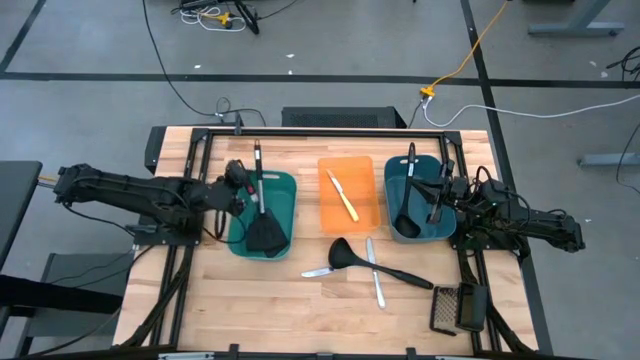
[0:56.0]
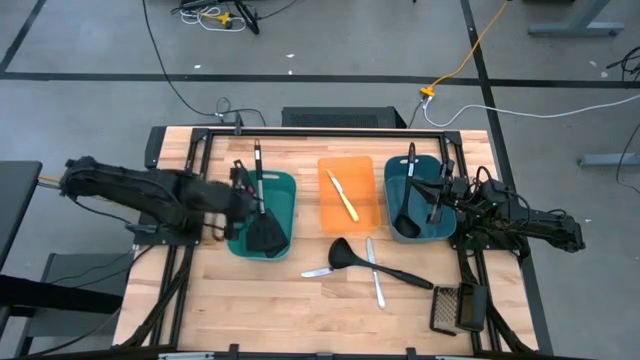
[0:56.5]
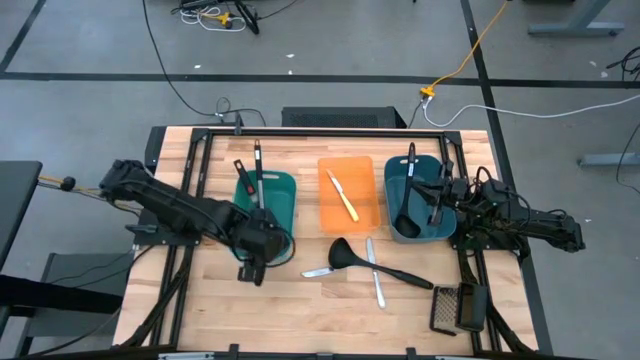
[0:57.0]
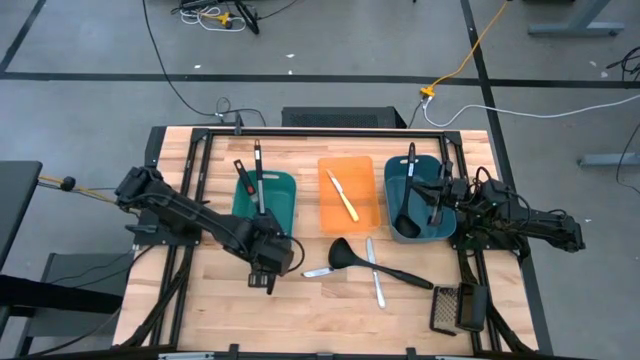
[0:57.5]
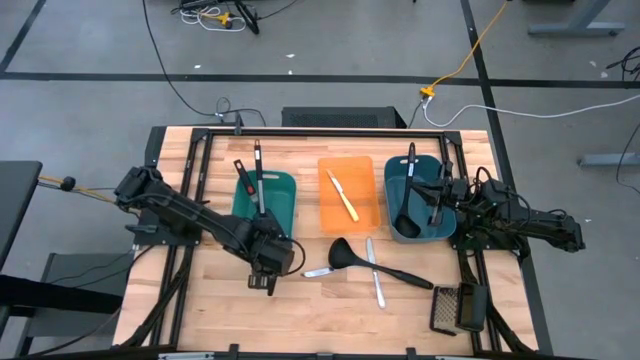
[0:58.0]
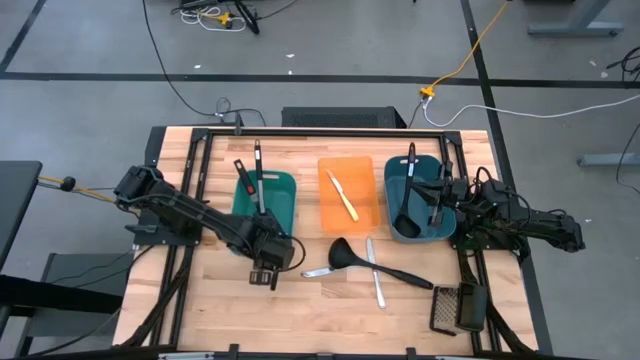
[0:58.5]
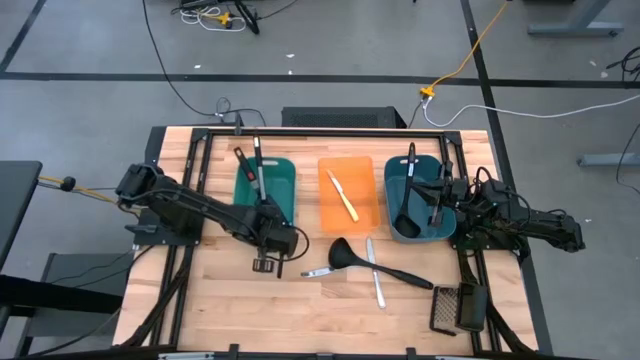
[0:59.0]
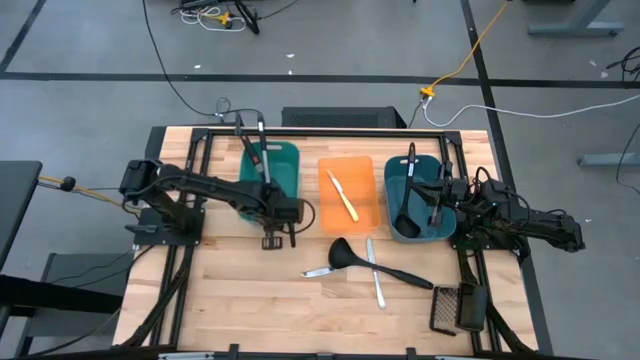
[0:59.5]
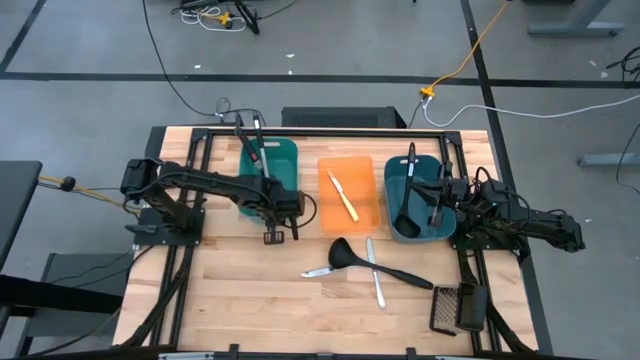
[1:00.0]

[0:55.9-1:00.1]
Task: Pick & Place Kitchen Items
Adjust the green bin

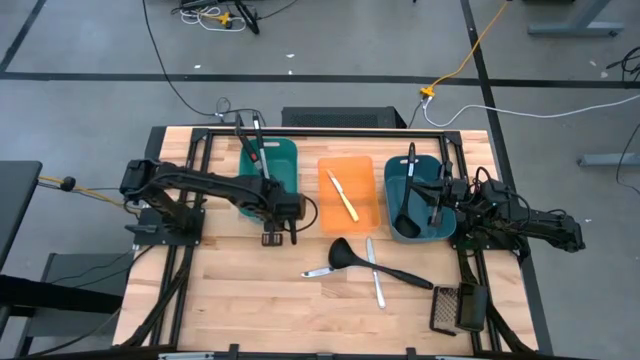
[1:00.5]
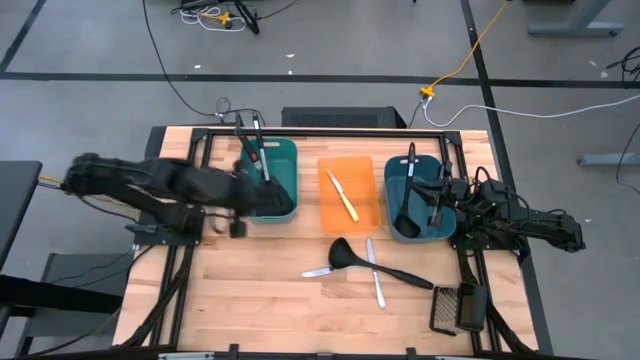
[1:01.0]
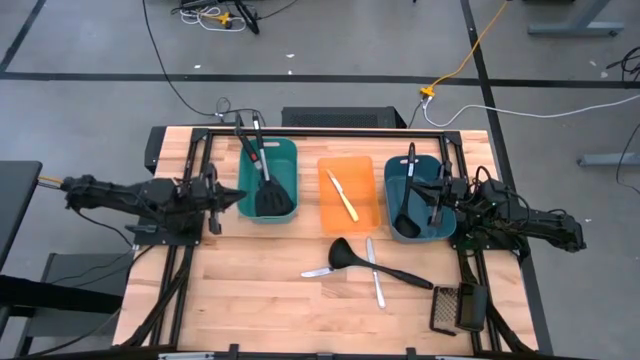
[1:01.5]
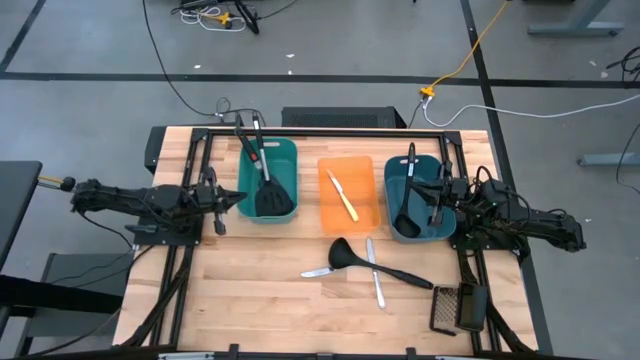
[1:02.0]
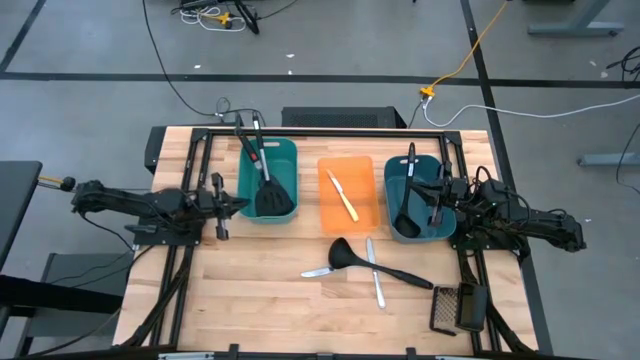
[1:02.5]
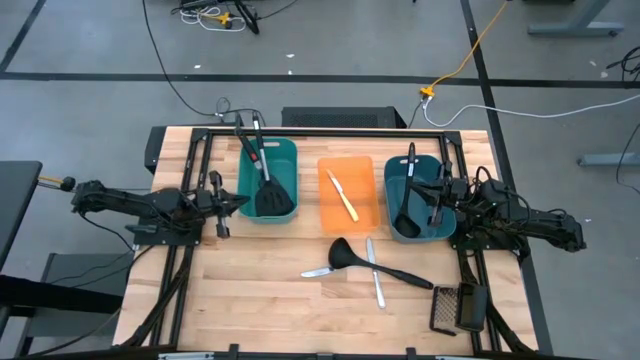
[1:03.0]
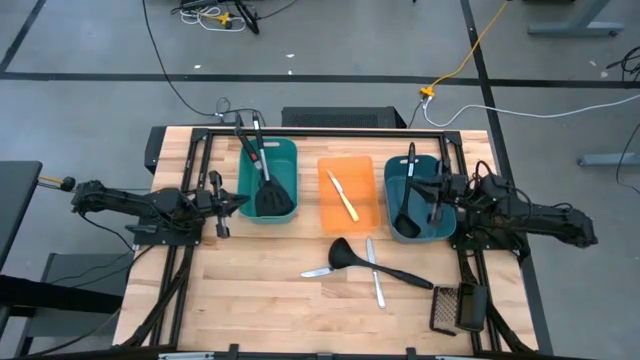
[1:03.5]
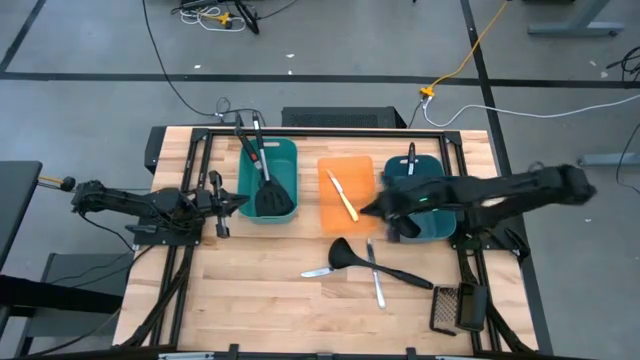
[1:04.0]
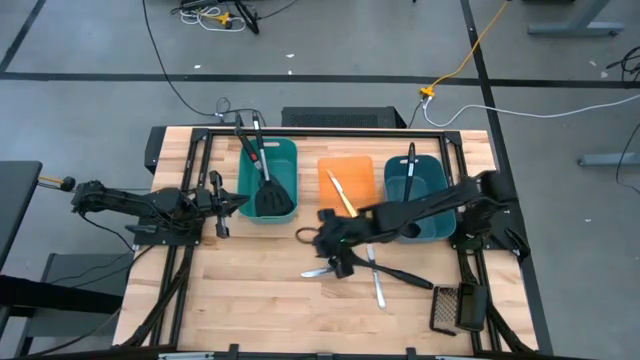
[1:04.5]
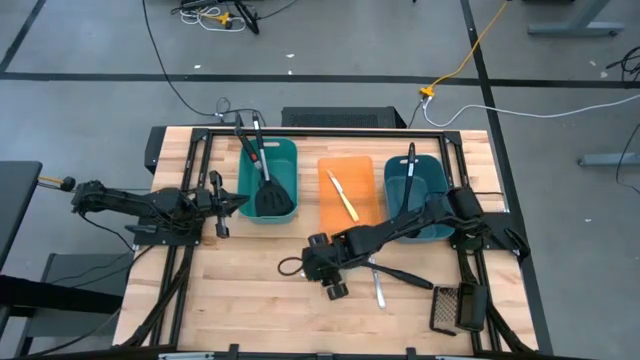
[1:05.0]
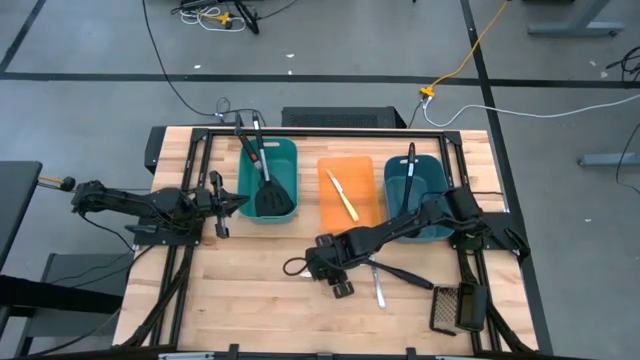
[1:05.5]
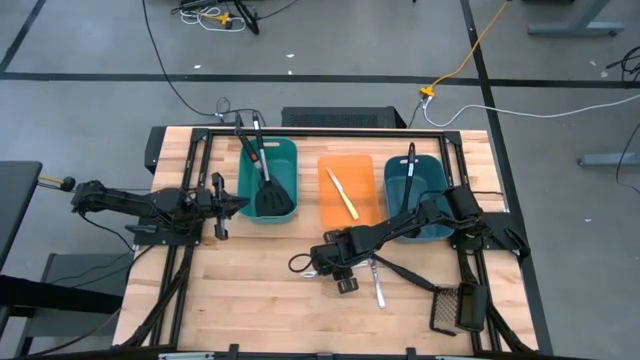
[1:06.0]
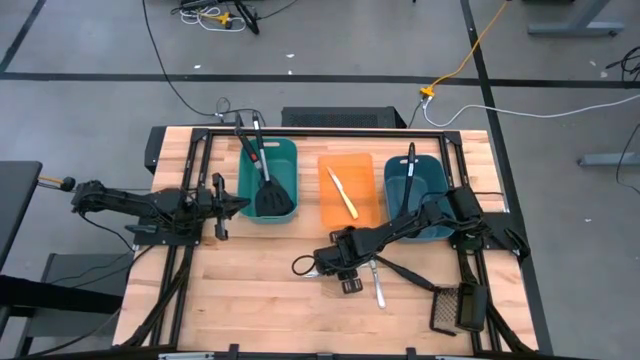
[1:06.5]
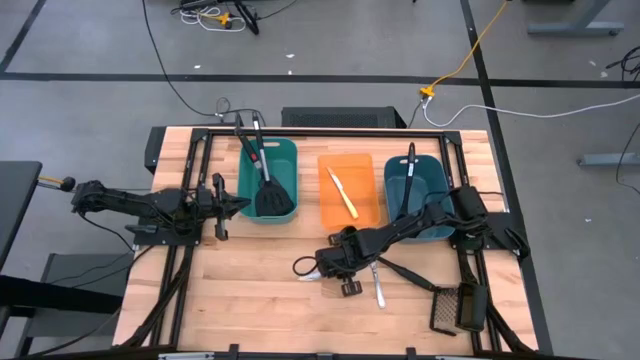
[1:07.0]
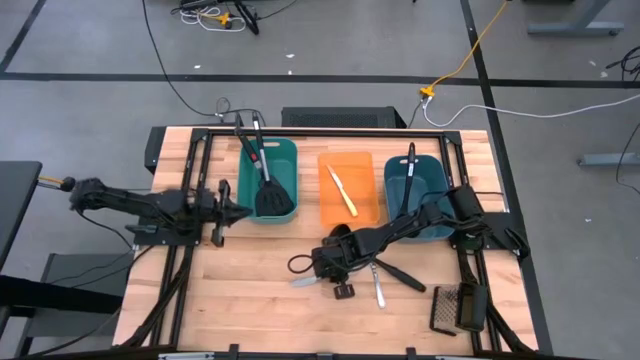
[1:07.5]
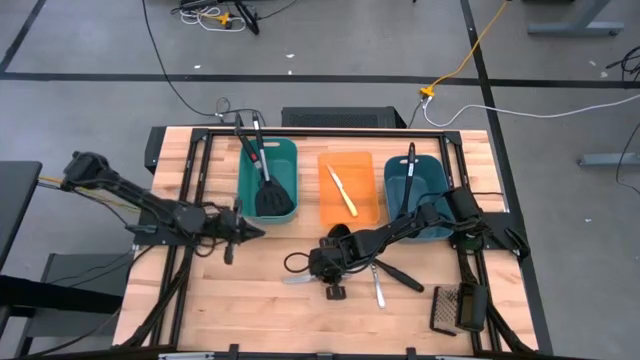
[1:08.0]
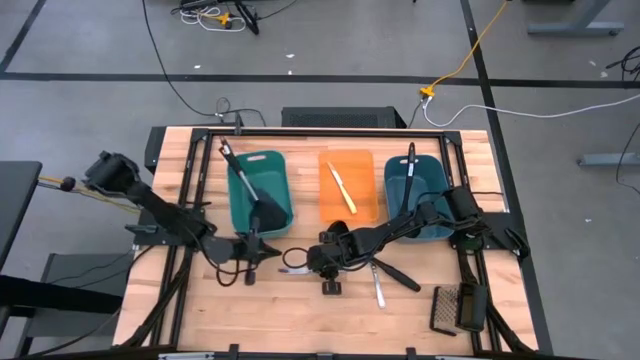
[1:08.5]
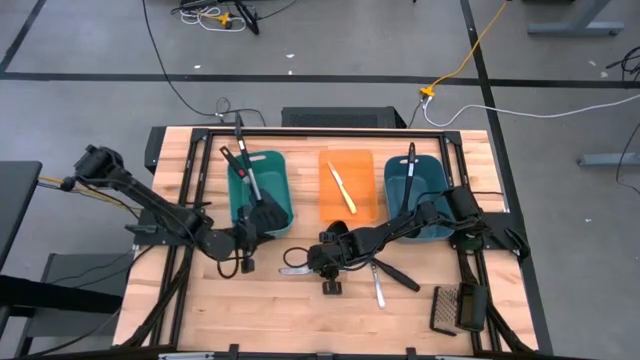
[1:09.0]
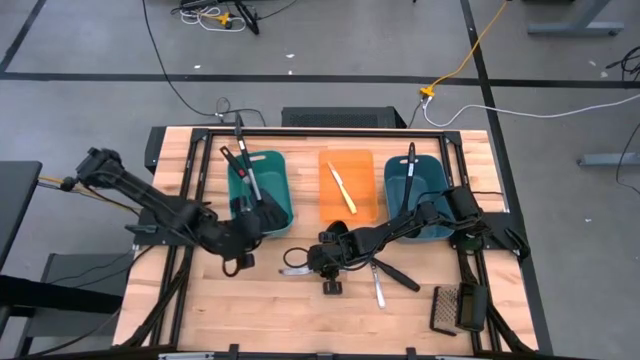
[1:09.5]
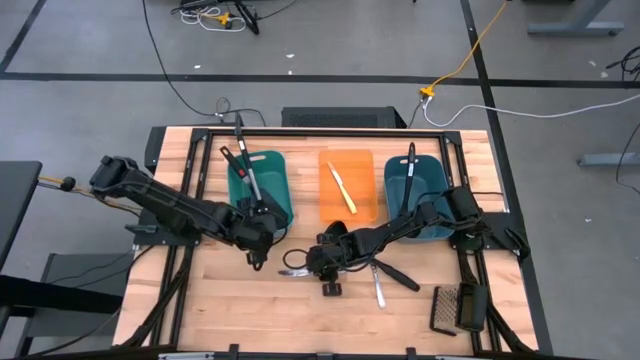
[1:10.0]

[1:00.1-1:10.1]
Put the left silver table knife into the orange bin

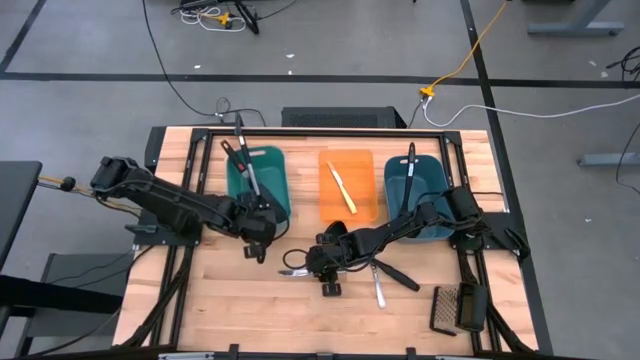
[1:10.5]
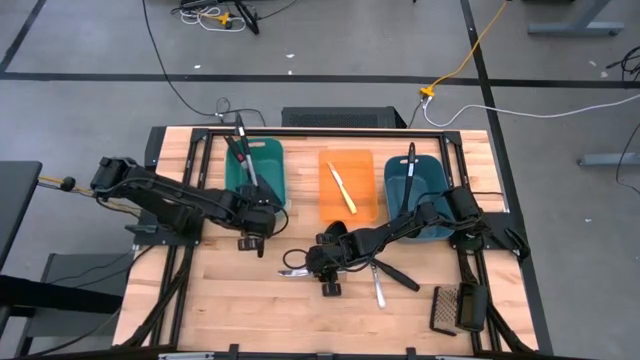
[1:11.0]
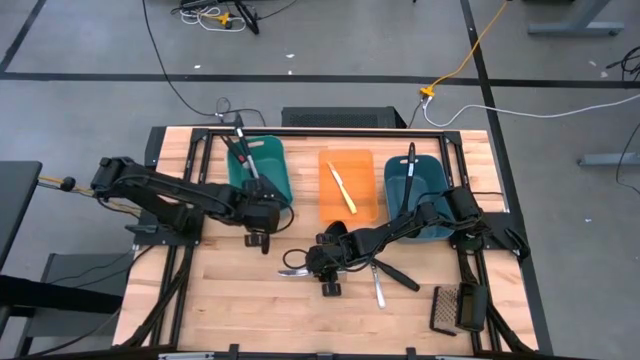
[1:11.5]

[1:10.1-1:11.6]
Adjust the green bin

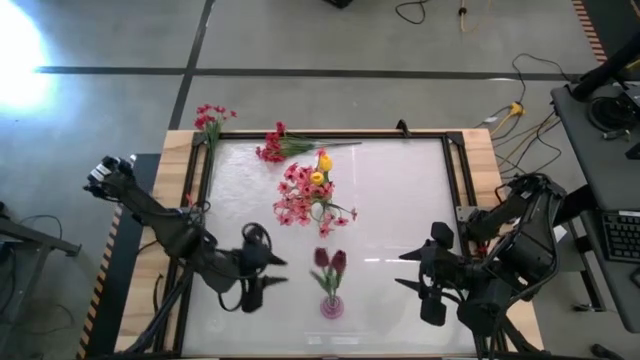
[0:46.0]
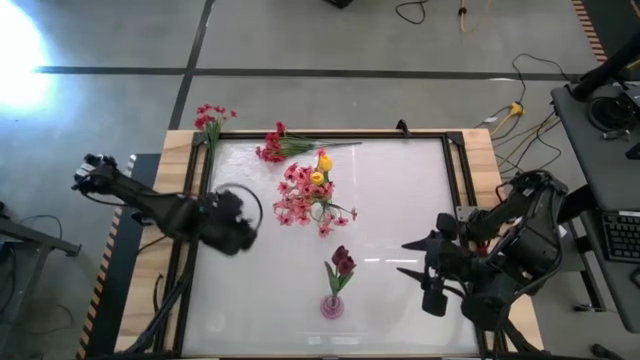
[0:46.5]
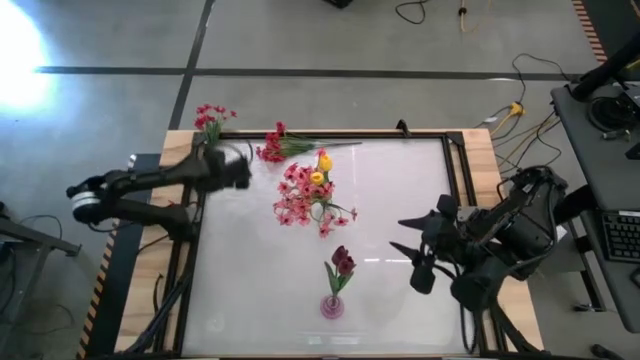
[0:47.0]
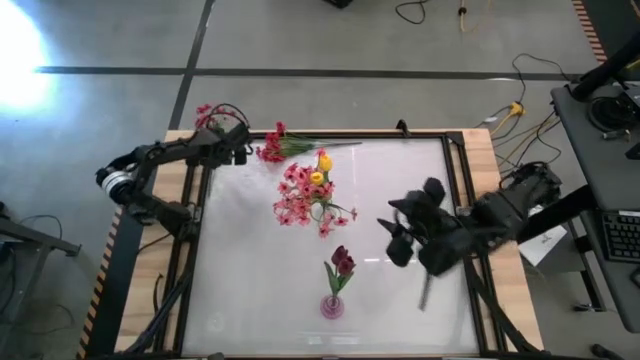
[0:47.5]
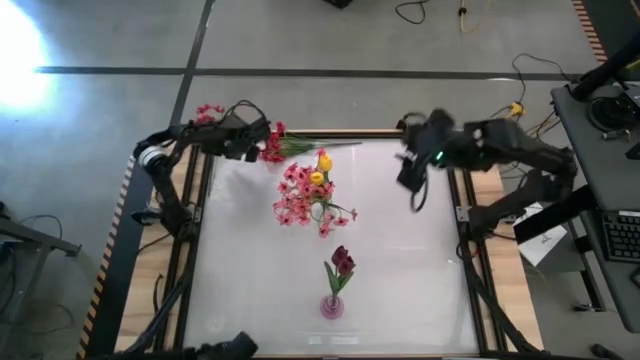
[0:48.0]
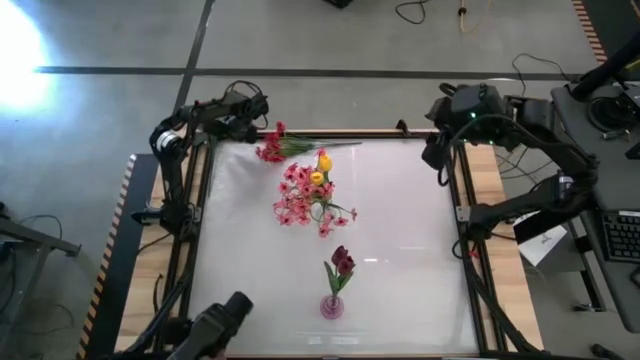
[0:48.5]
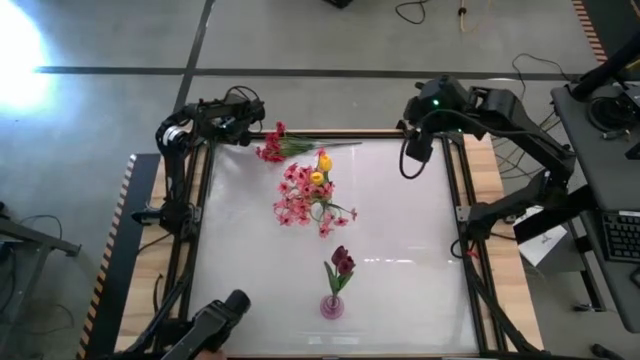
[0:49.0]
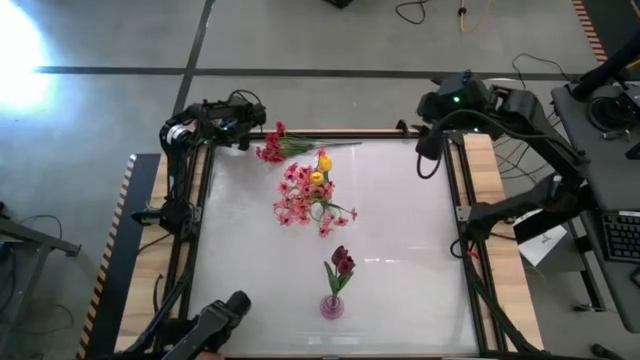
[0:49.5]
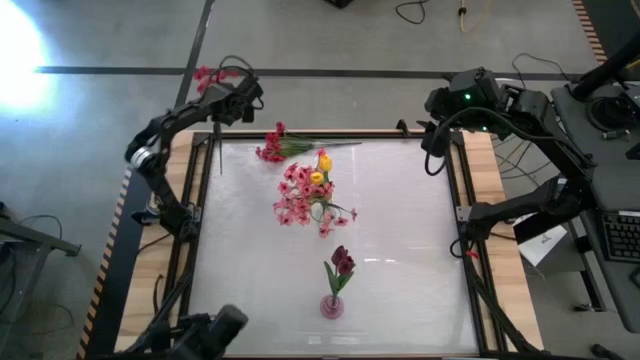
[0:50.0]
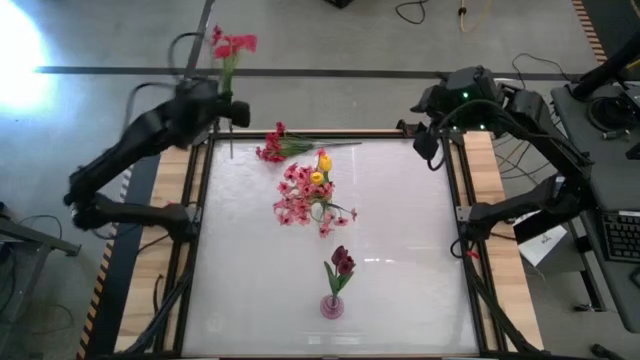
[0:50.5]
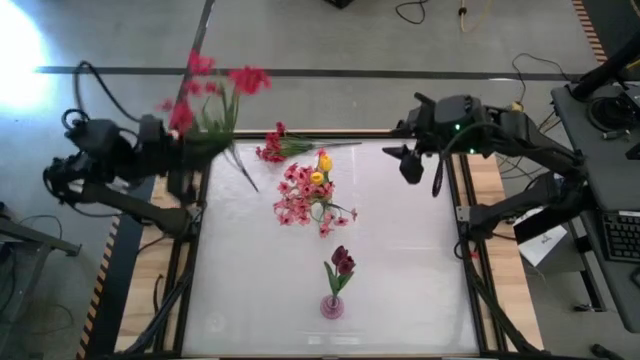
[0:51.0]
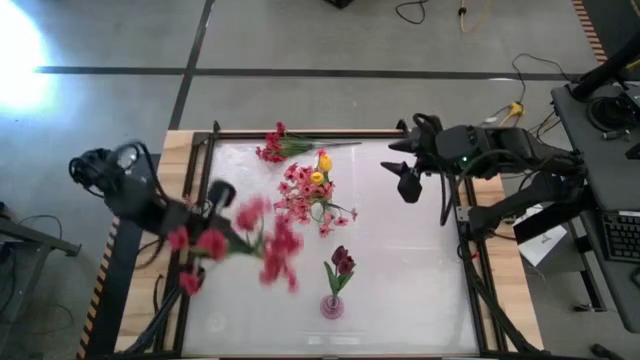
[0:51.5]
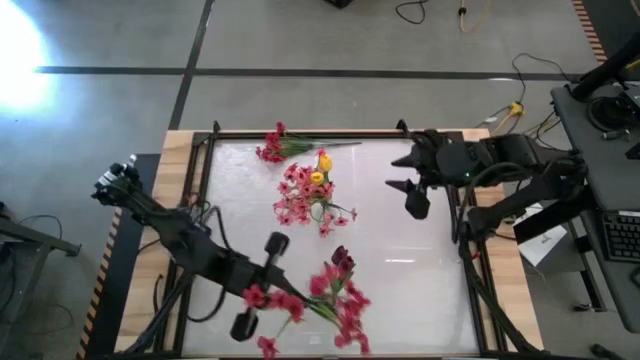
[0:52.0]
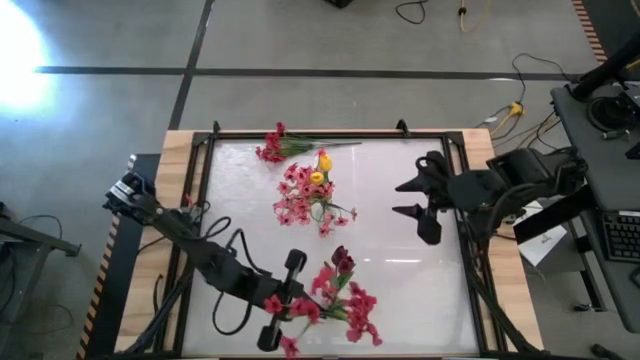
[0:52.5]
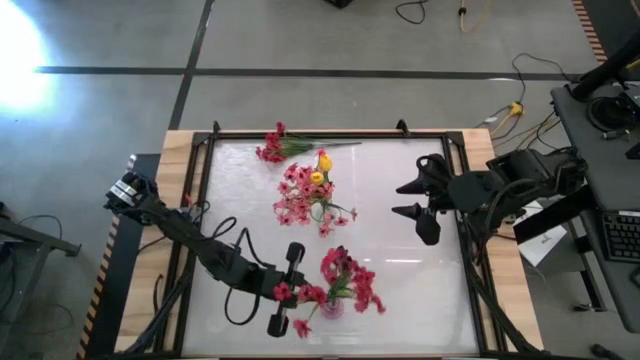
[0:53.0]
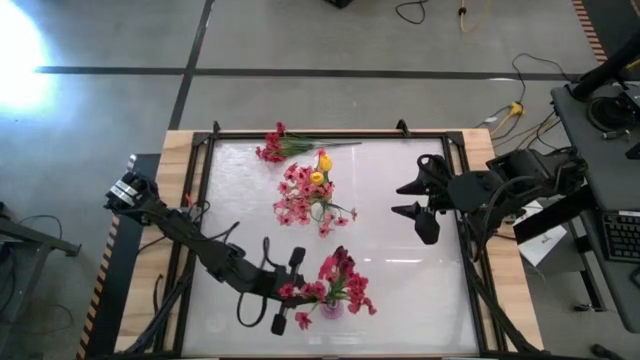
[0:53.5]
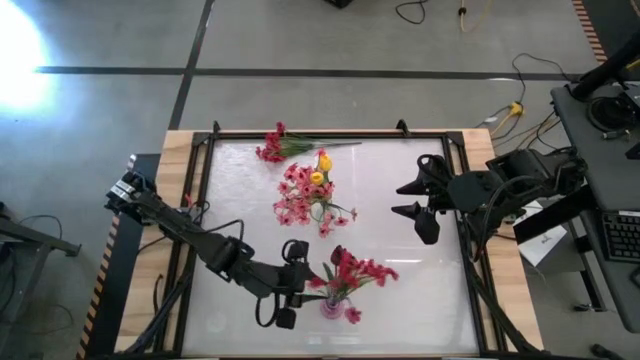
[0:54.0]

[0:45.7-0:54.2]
Task: Sort flowers into vase by color
Put the left red flower into the purple vase
